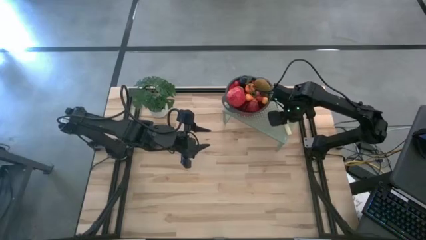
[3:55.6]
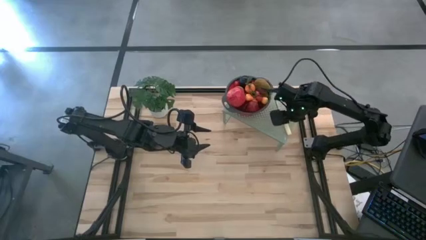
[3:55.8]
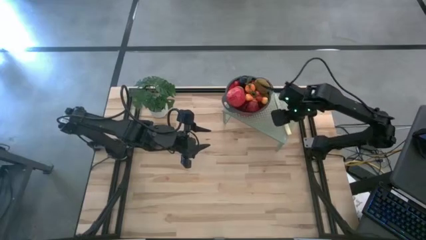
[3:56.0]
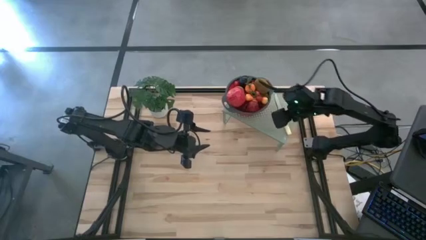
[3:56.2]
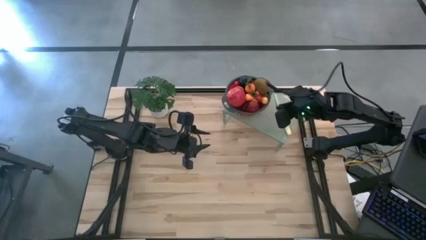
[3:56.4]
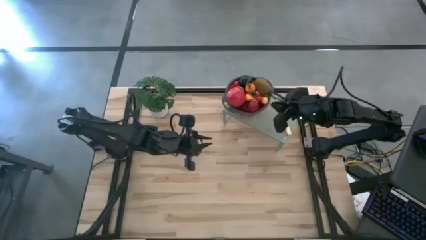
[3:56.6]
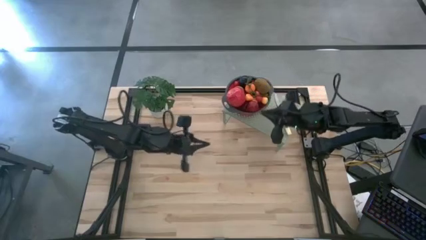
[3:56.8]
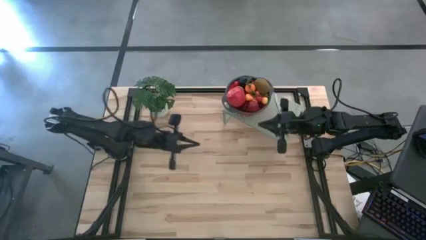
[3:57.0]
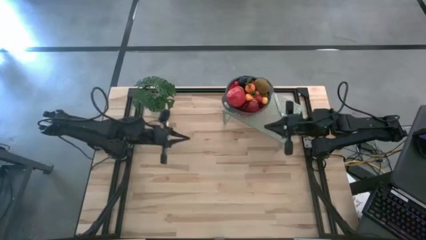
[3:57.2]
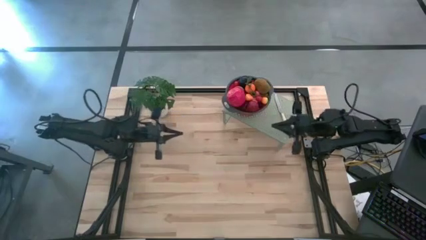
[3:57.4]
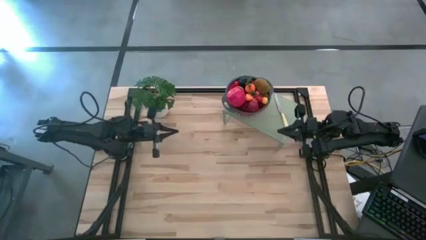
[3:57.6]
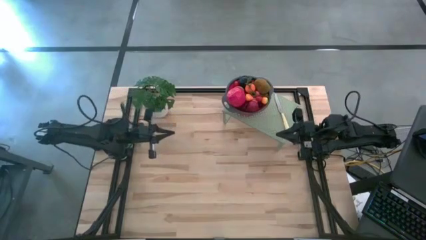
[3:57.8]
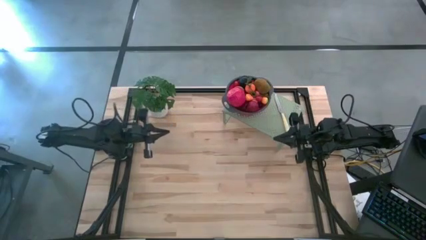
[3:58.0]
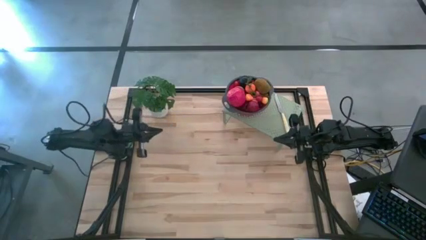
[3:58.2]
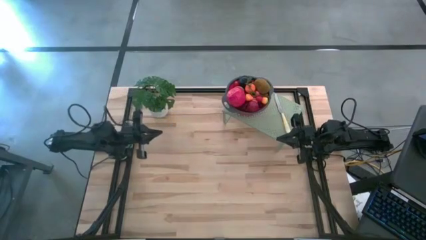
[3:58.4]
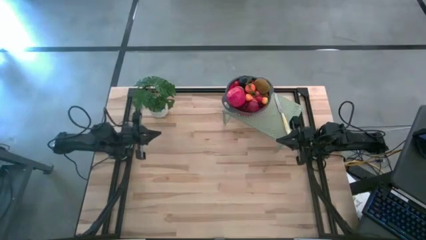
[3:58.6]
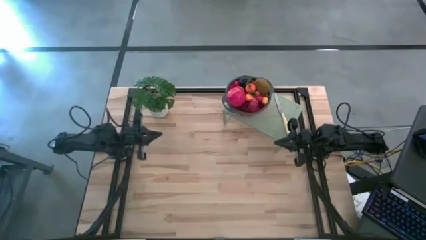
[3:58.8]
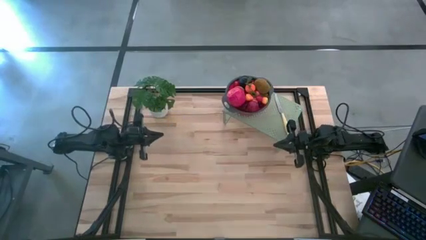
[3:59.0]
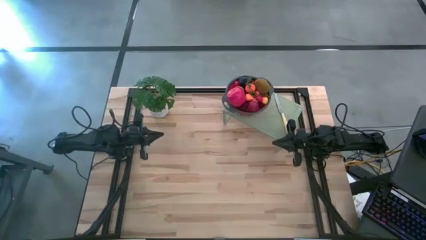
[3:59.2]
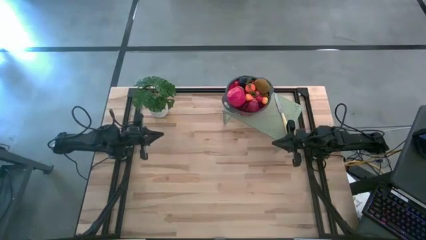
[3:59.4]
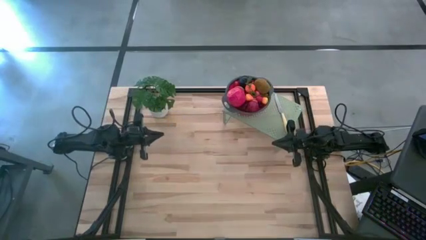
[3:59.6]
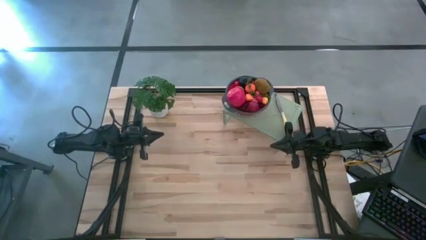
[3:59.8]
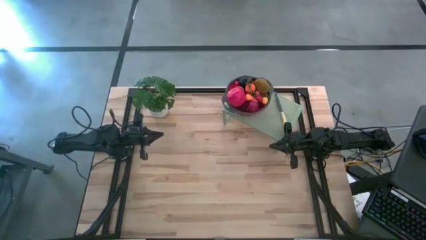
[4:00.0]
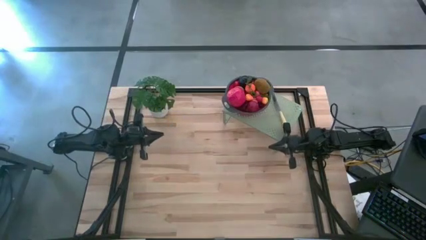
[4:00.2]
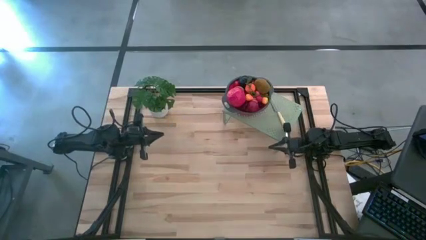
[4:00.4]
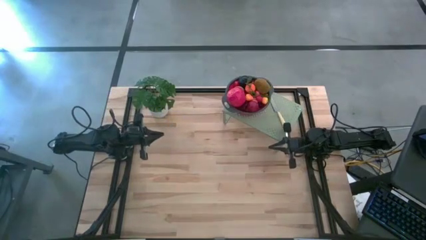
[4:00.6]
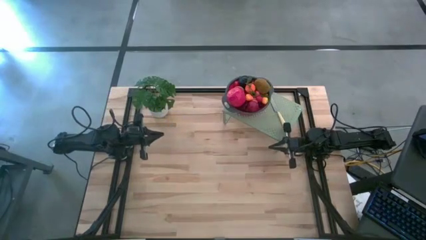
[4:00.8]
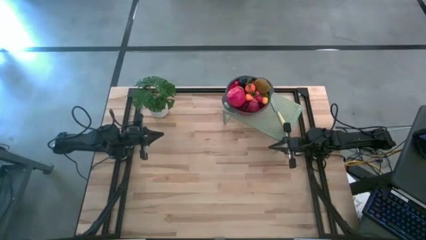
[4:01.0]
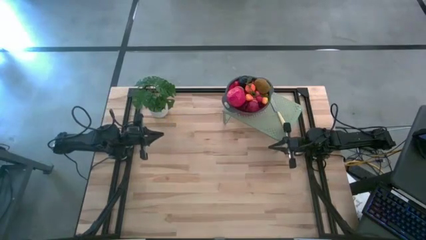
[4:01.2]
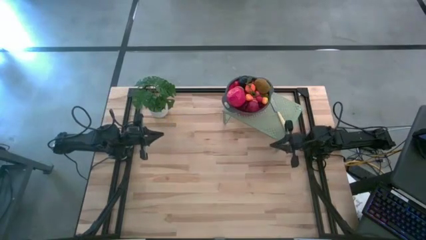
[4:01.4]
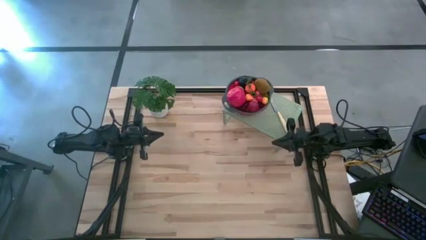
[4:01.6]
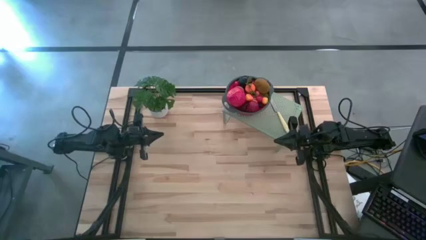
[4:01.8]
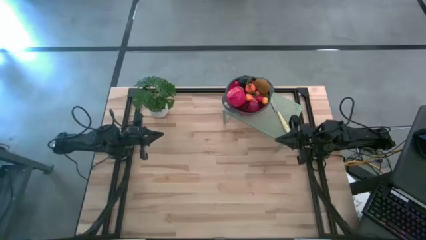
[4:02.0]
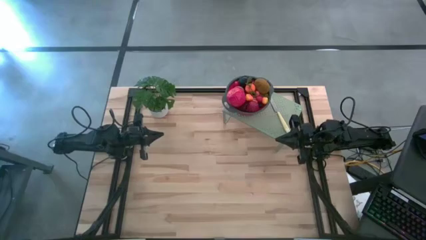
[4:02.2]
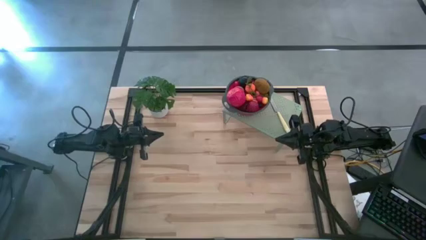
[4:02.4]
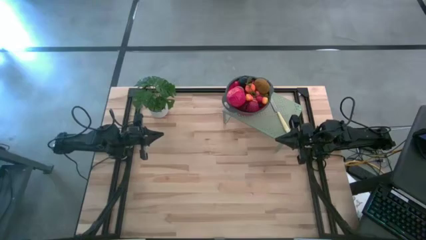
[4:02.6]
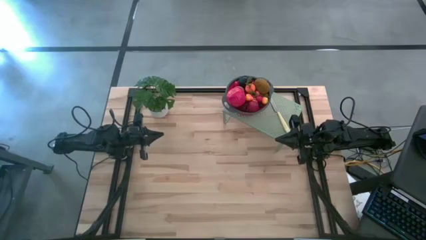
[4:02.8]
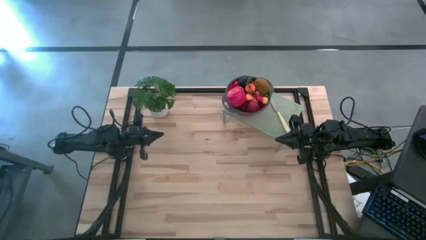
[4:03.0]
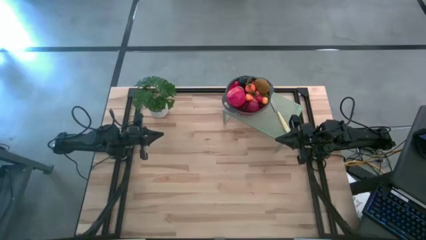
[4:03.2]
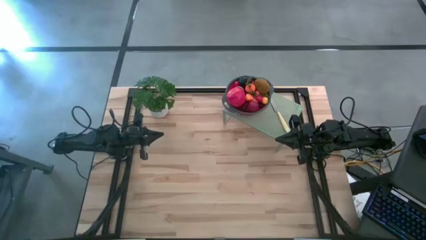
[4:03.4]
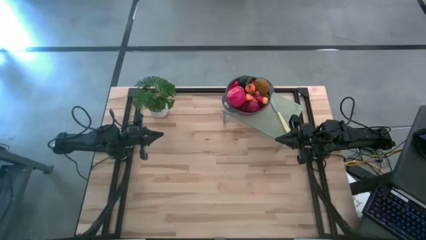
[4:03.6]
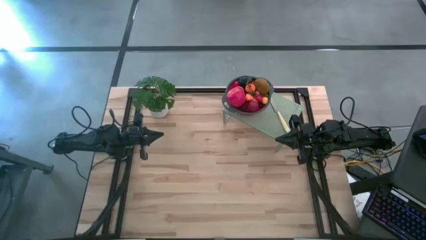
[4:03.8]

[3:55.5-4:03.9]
Task: Pick & Place Fruit
Return to Home Position

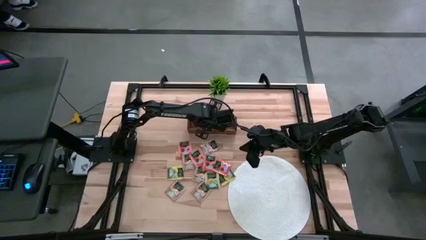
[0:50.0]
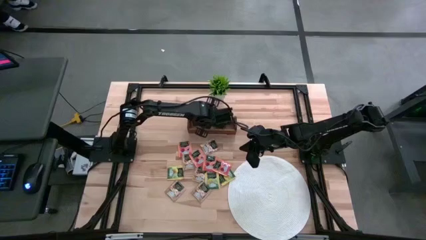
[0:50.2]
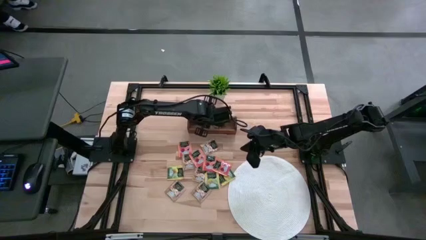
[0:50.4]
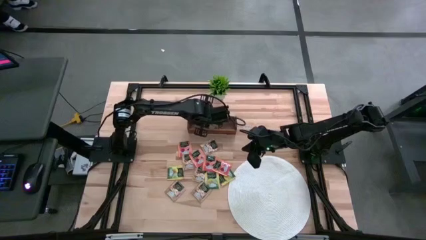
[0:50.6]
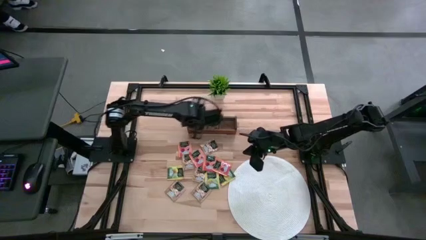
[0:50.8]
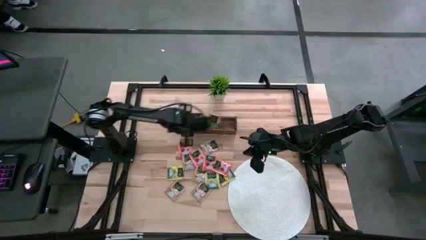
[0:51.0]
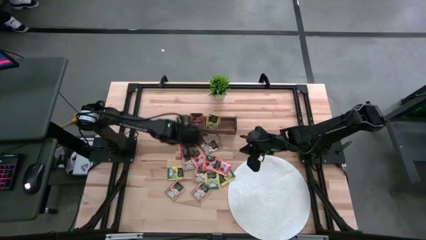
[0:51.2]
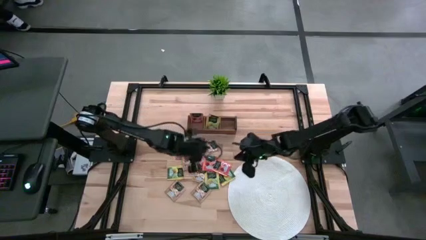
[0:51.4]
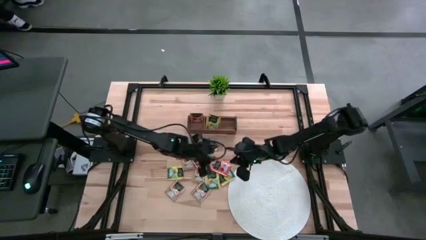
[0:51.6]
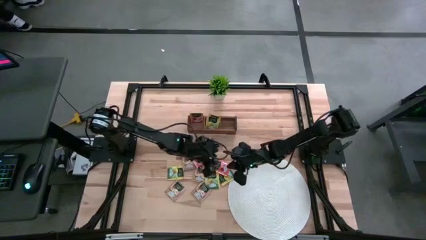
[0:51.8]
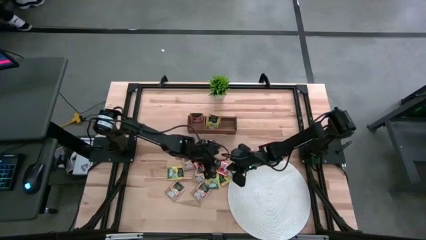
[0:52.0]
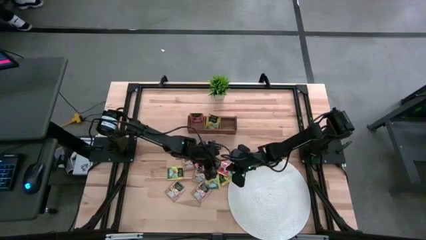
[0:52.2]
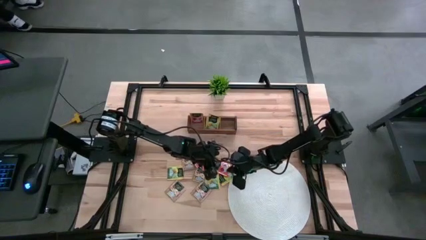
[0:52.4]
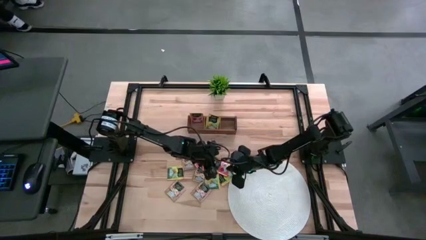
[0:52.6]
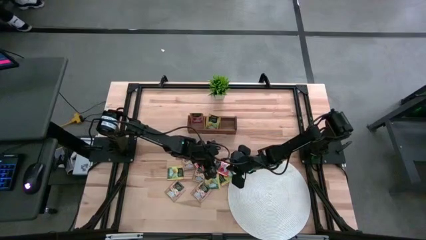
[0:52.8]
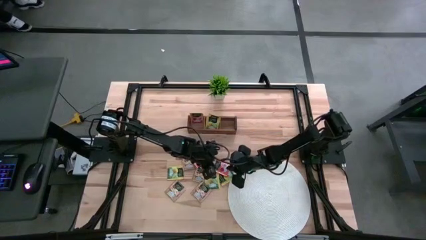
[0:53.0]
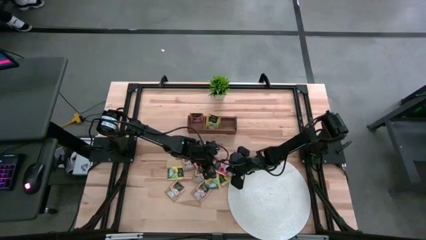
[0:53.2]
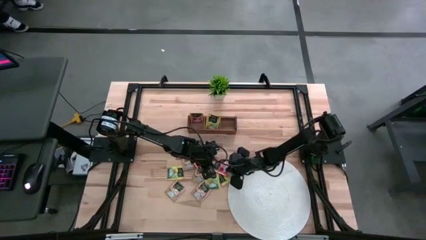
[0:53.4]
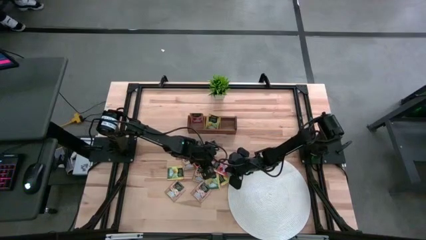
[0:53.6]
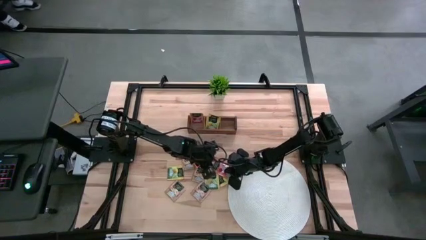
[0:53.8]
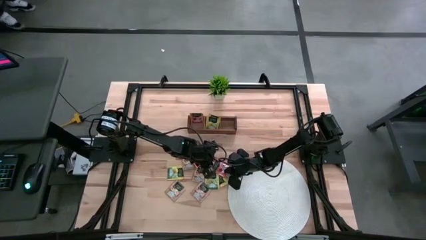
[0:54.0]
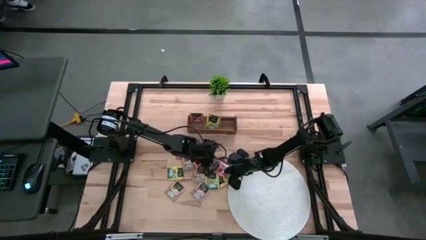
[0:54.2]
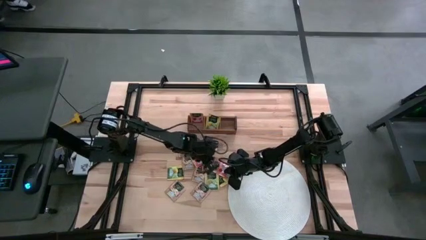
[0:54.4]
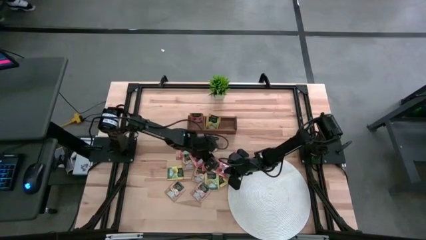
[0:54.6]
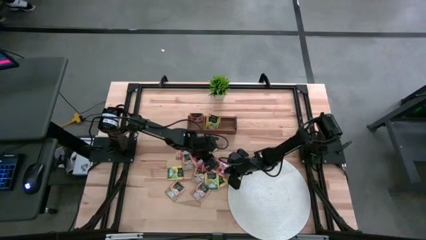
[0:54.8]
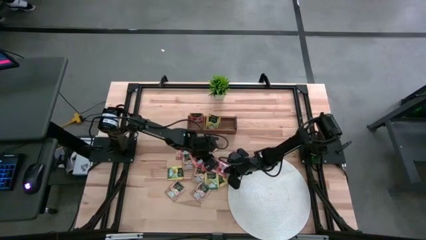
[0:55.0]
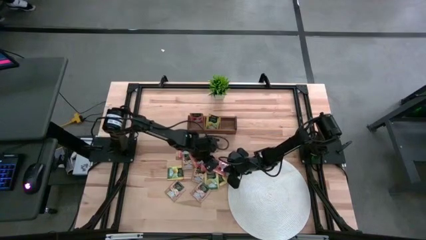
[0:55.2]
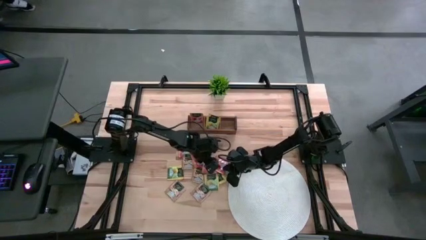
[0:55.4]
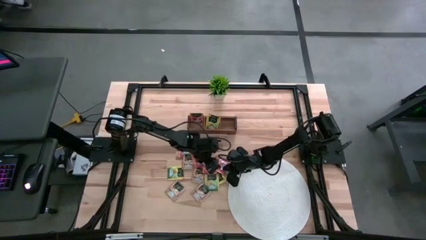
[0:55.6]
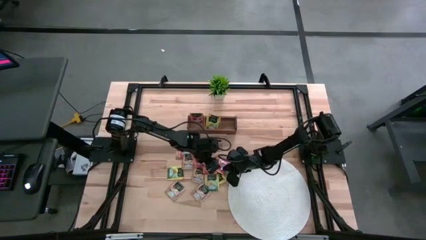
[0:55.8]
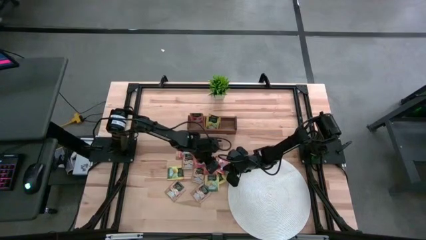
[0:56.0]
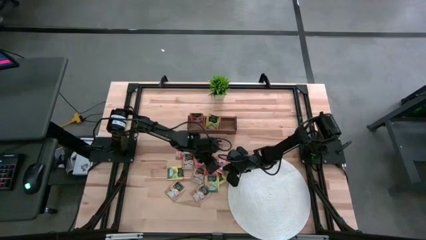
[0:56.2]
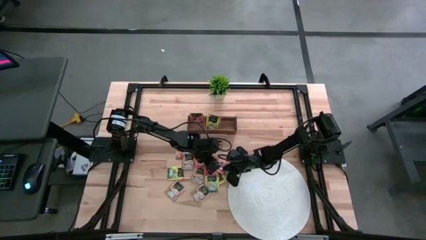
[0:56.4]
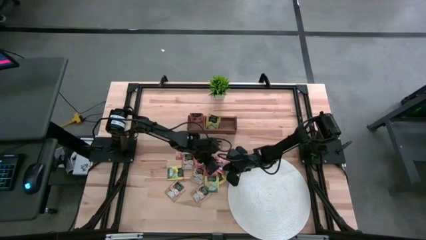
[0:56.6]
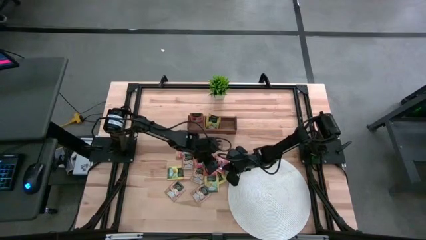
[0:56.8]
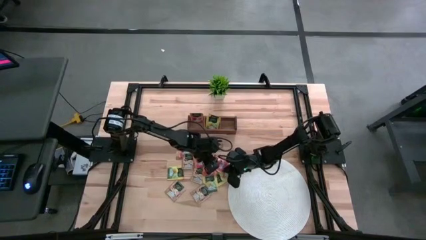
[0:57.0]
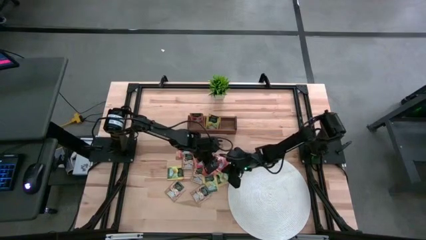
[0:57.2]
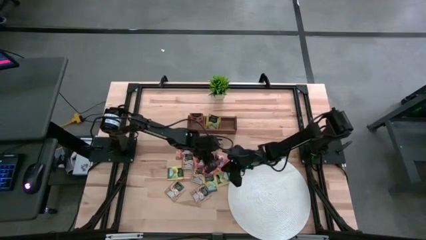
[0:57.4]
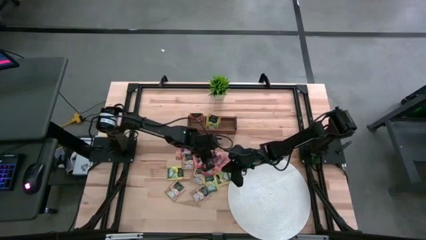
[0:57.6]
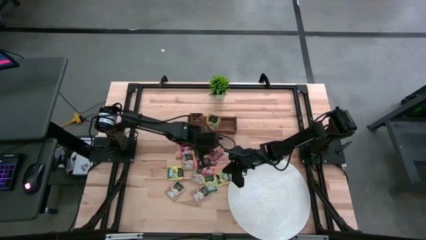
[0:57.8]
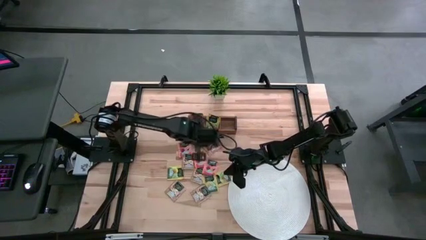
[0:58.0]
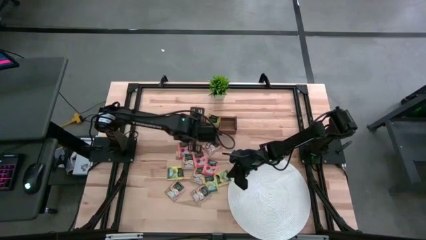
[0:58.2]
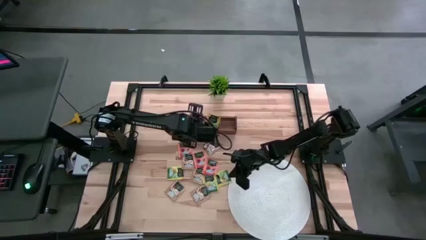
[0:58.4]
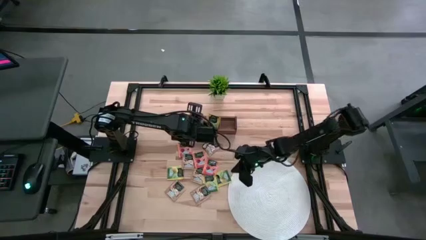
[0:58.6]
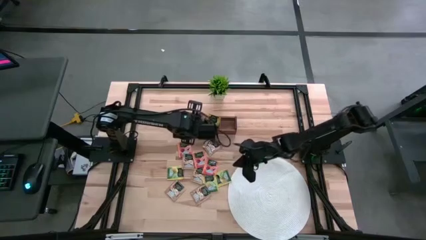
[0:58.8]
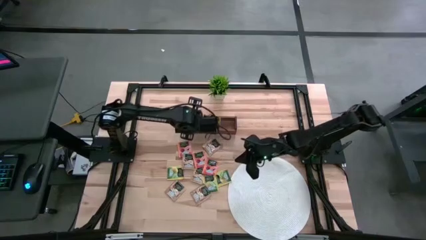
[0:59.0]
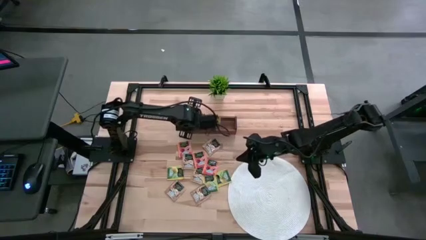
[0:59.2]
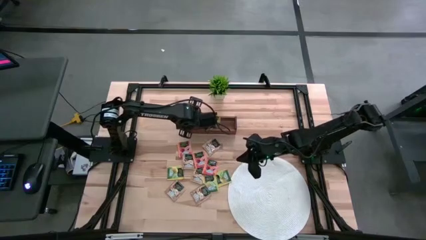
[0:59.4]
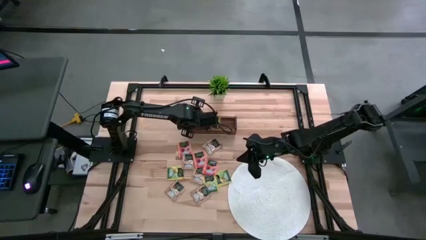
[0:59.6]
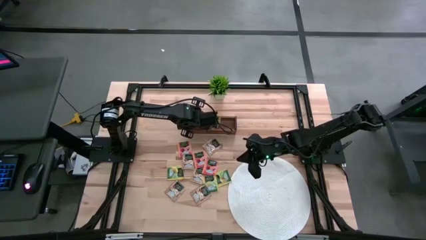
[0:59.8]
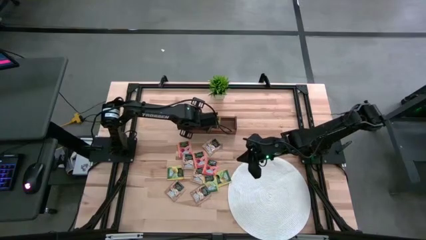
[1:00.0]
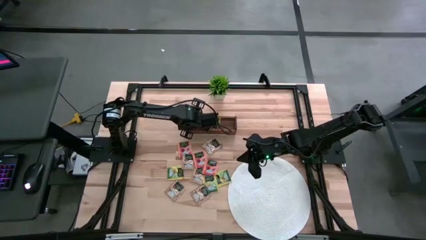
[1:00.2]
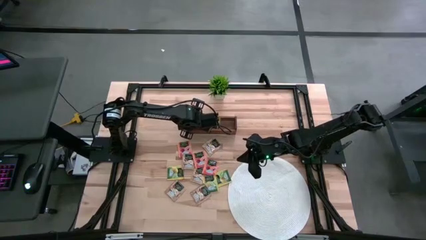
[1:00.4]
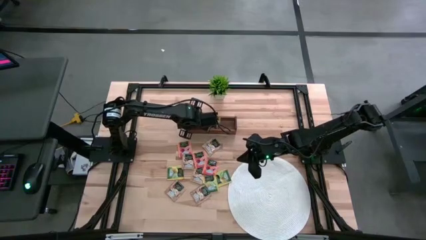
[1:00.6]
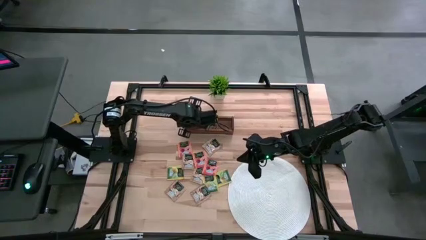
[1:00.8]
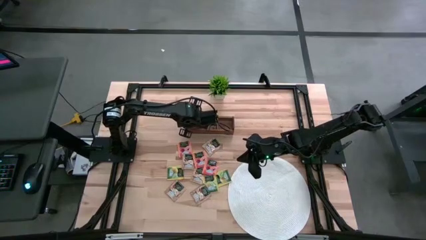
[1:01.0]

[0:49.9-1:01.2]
Task: Pick & Place Tea
Put the orange tea bag into the left section of the wooden organizer
